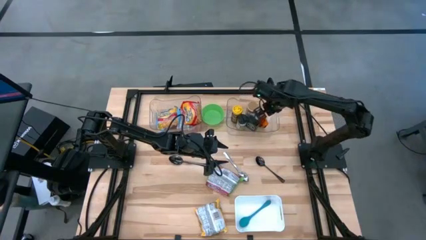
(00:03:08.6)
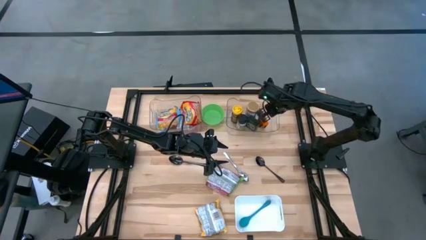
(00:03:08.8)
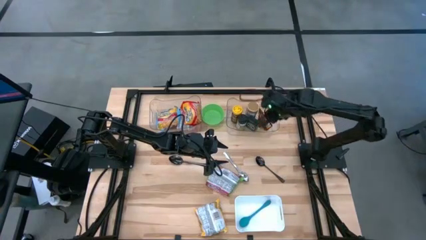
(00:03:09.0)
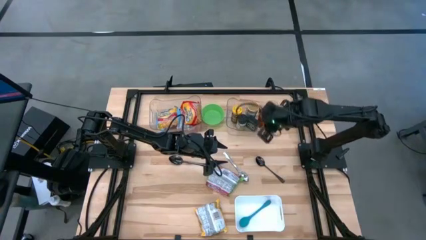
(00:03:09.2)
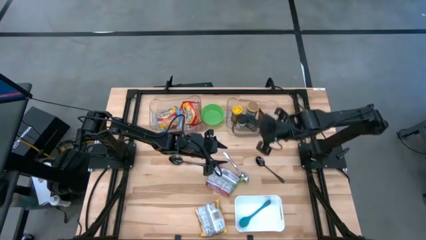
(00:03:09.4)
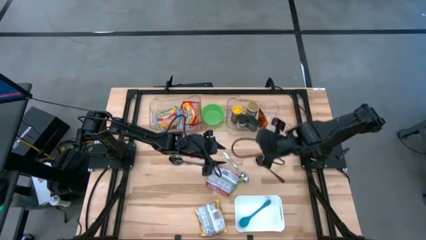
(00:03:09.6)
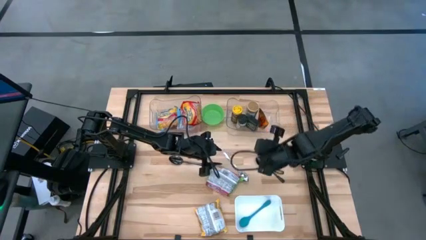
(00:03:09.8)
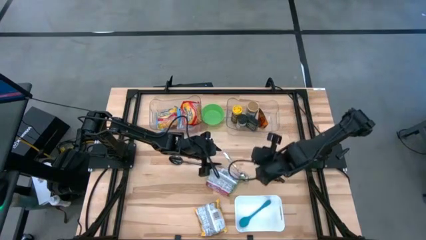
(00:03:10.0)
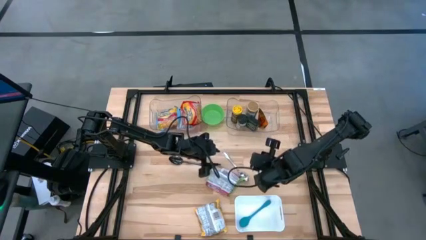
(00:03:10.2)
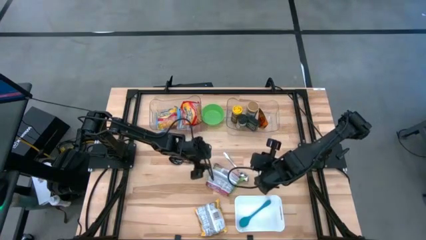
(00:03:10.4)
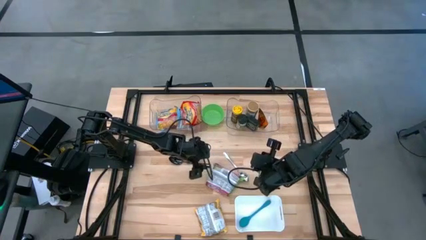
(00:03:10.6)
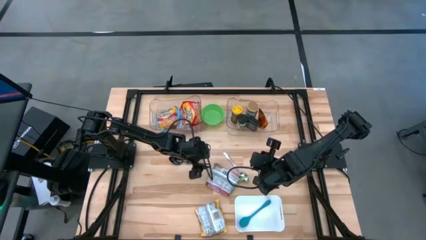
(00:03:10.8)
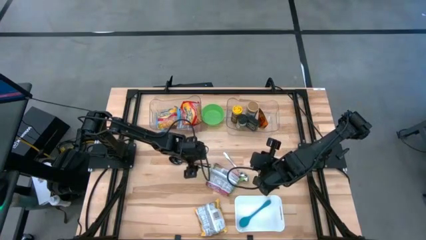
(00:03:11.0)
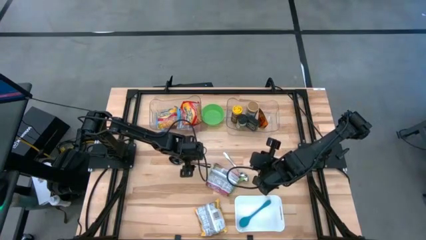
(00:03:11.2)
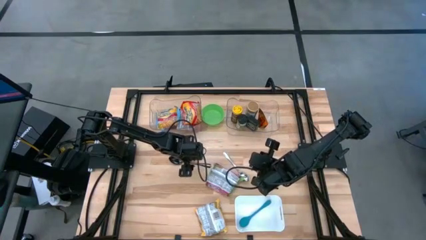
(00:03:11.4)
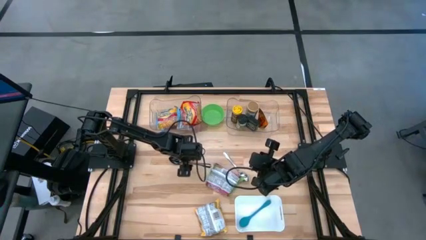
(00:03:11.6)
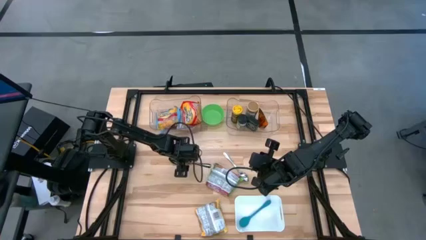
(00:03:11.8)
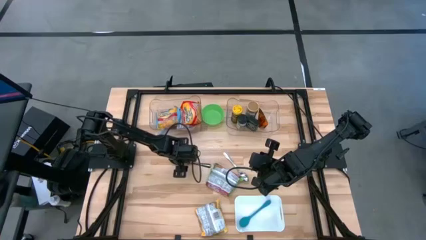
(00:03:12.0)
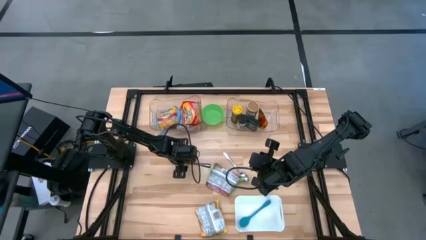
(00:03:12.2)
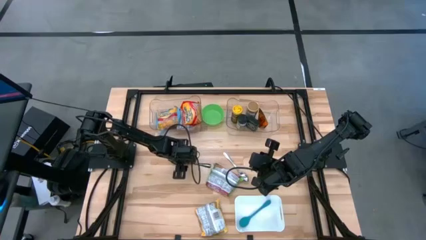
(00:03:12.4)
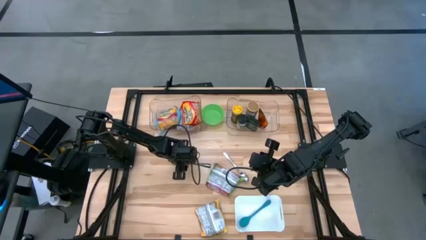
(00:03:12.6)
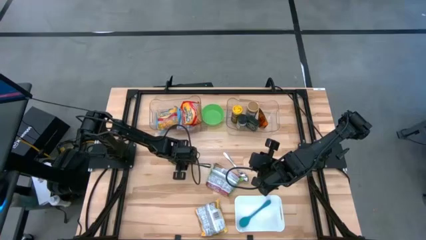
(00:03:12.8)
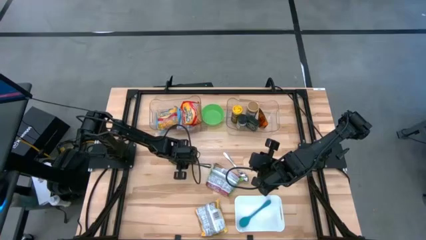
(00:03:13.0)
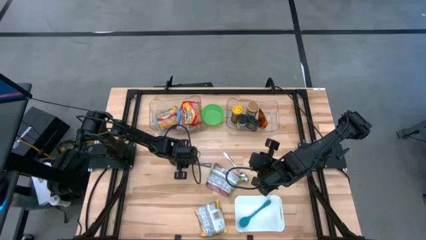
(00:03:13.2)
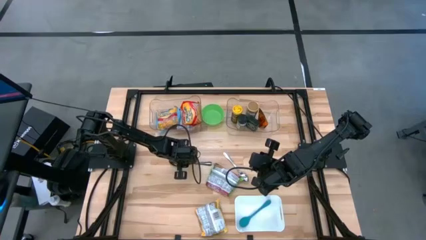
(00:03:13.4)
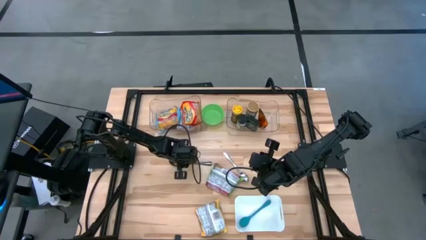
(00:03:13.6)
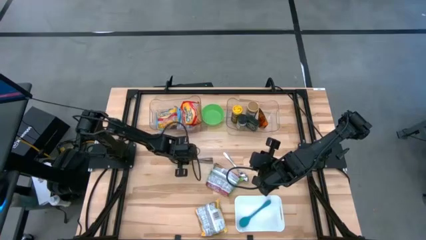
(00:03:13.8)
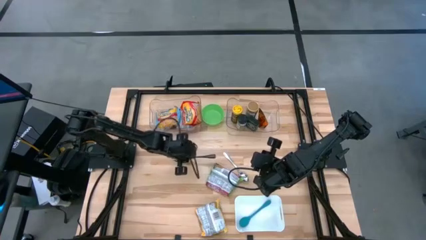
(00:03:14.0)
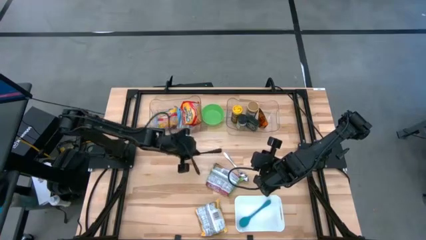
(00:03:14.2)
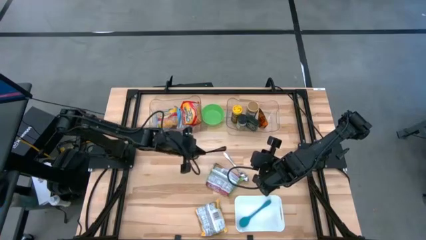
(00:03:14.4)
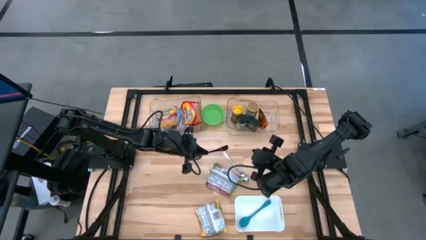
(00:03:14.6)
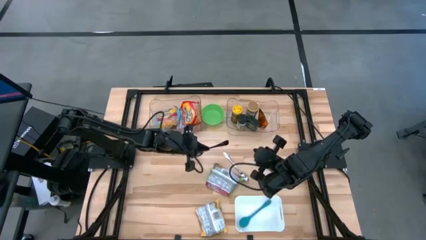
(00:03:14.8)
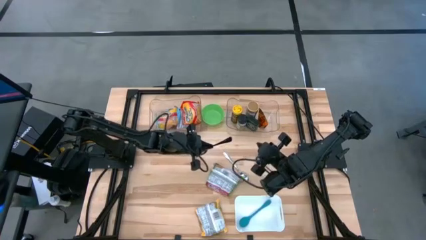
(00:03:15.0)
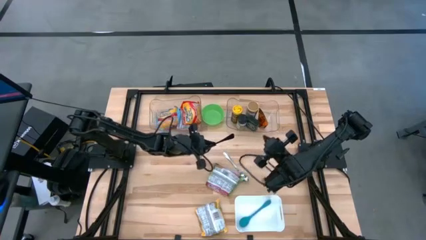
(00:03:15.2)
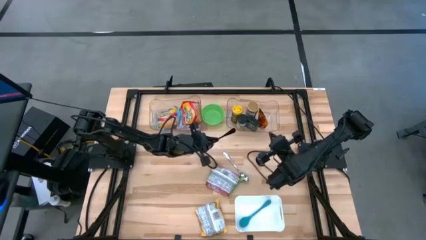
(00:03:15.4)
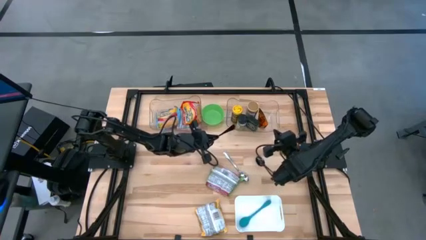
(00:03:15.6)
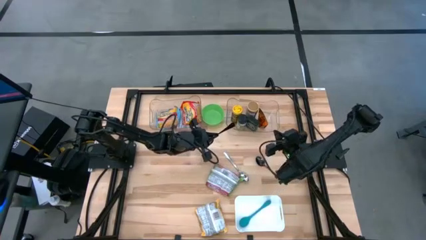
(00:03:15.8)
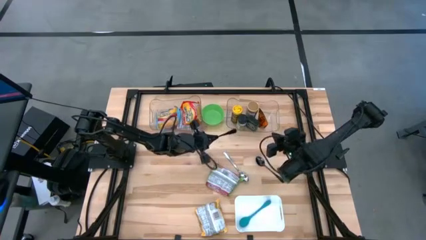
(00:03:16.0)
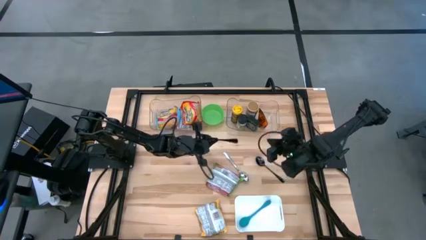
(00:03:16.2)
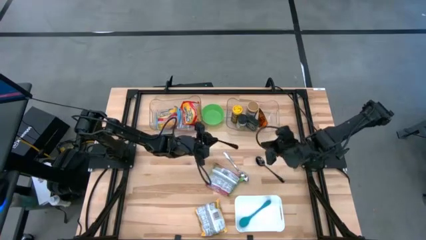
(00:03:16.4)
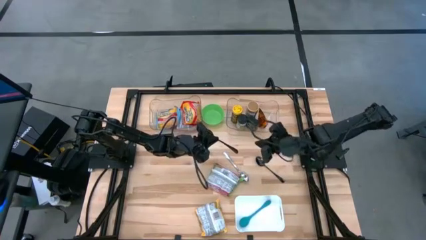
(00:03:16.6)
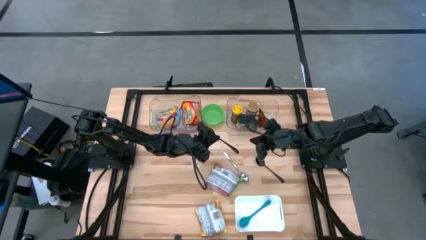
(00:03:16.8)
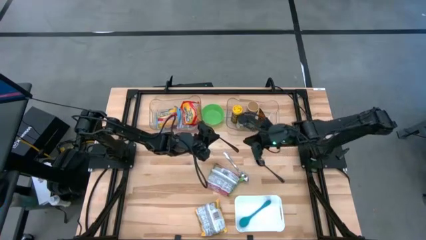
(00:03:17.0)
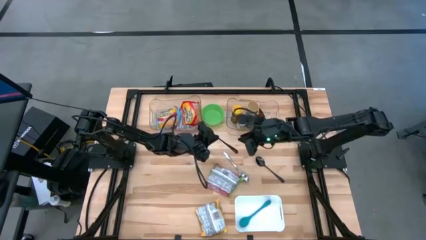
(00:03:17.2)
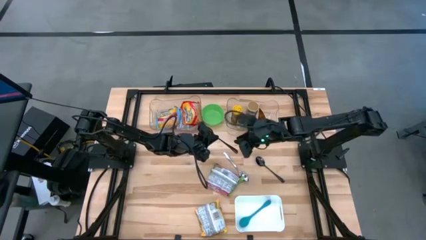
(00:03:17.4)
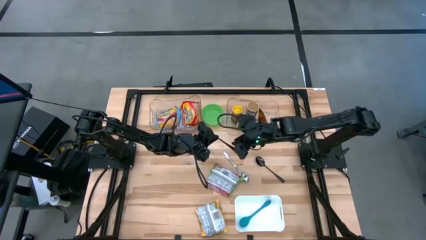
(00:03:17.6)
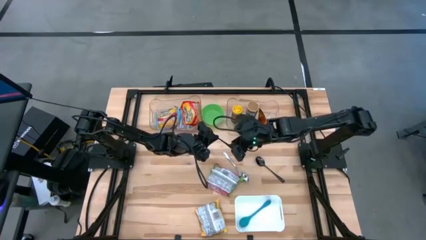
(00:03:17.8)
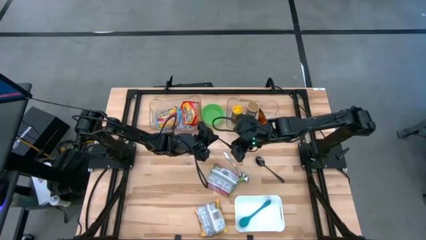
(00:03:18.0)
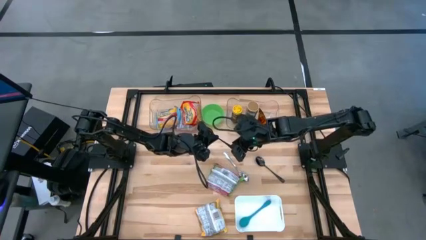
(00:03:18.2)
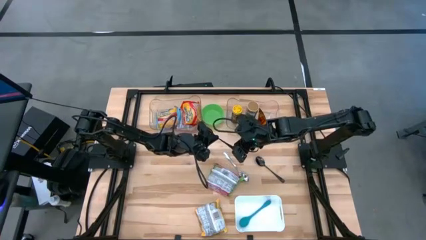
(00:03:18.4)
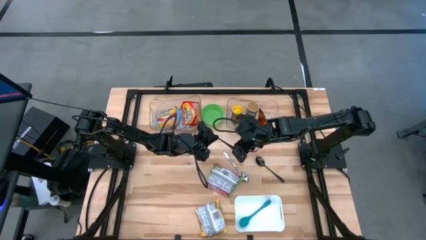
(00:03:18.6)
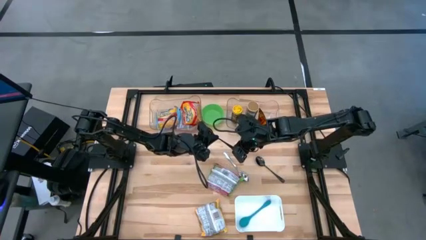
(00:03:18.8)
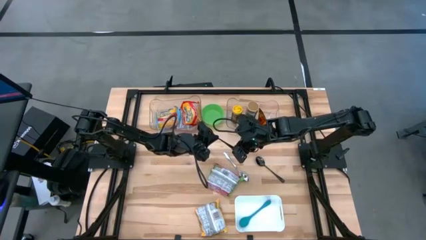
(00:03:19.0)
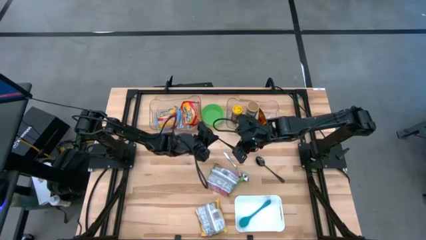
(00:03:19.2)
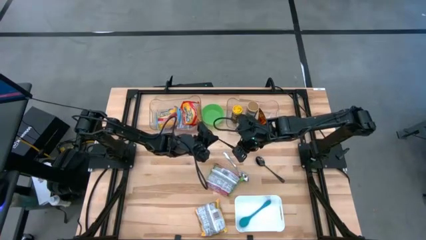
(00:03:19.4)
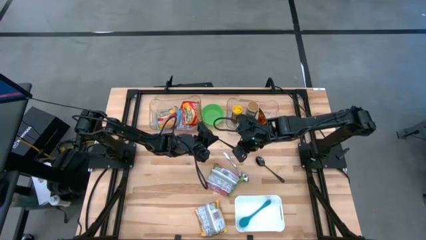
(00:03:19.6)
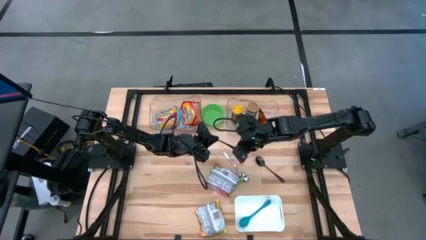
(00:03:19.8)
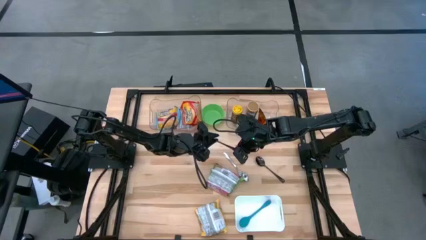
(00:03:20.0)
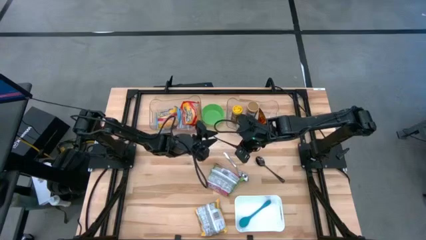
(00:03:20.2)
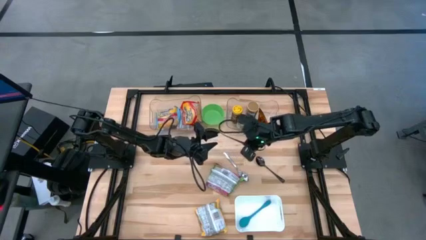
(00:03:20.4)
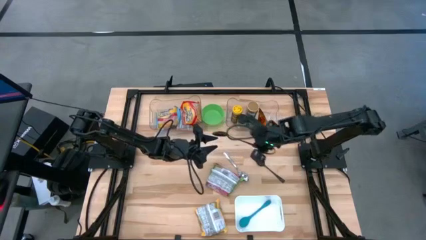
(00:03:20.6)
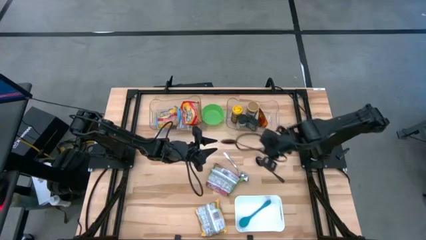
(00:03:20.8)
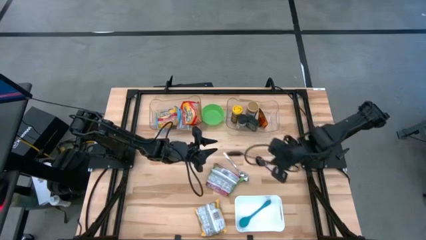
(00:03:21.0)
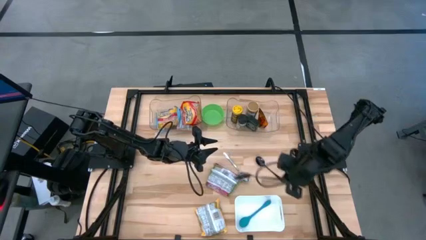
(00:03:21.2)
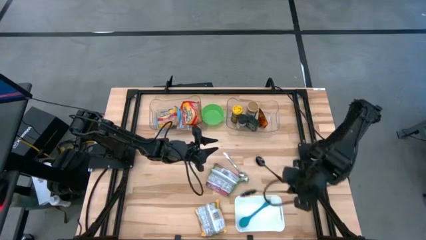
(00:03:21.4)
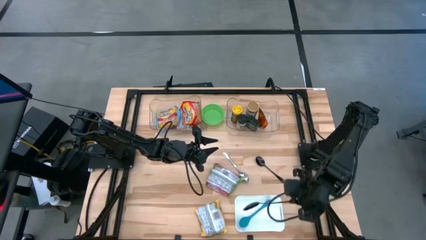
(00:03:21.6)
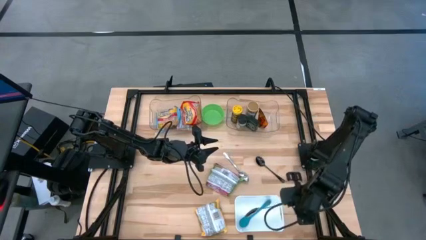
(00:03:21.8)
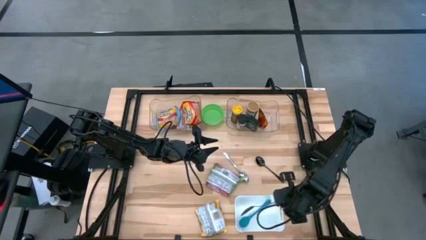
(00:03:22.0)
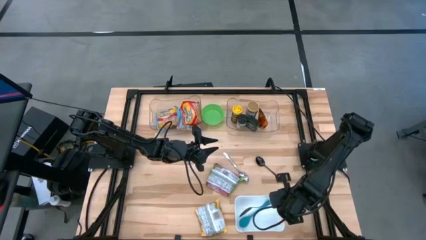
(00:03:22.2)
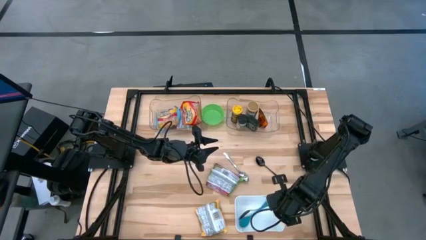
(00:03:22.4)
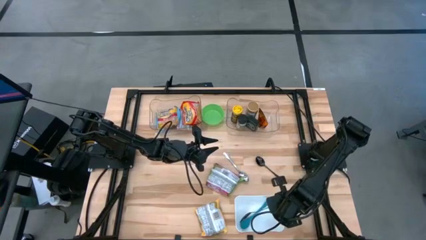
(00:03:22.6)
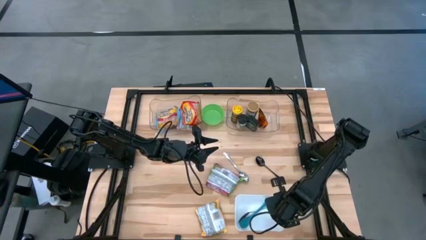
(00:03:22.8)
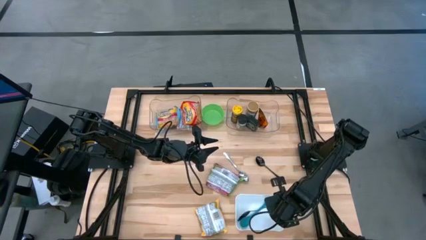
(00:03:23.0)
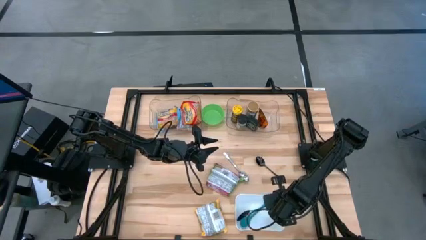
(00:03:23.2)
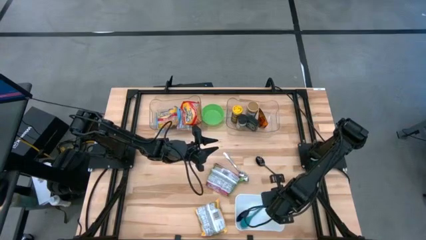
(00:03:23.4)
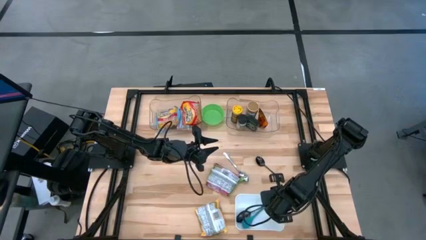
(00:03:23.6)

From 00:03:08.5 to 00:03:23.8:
Task: Pick & Place Food Item
Put the left black spoon in the white bin
